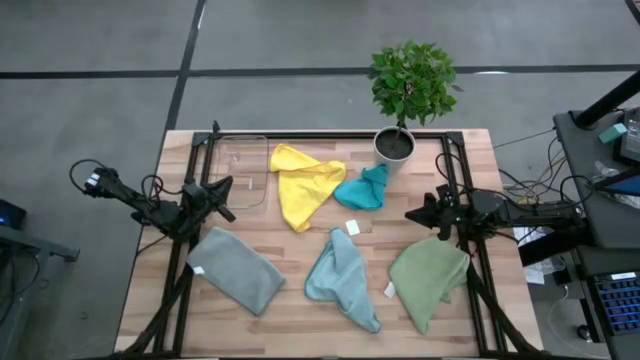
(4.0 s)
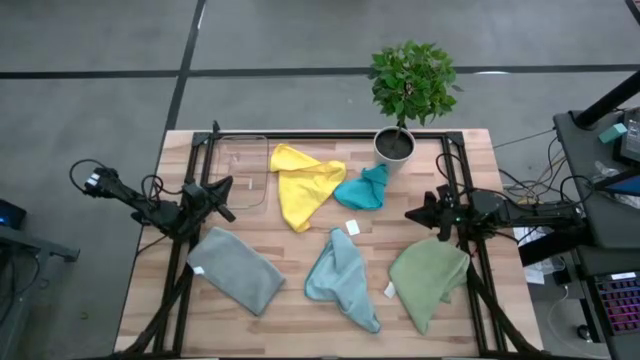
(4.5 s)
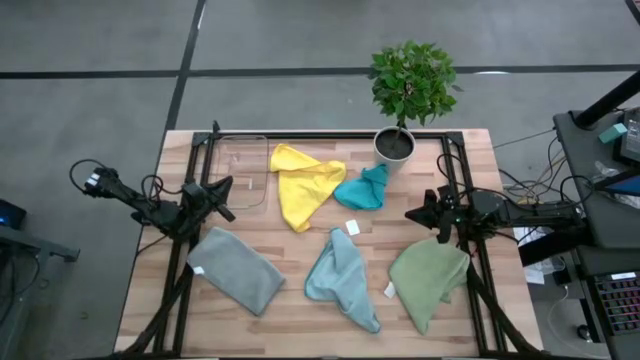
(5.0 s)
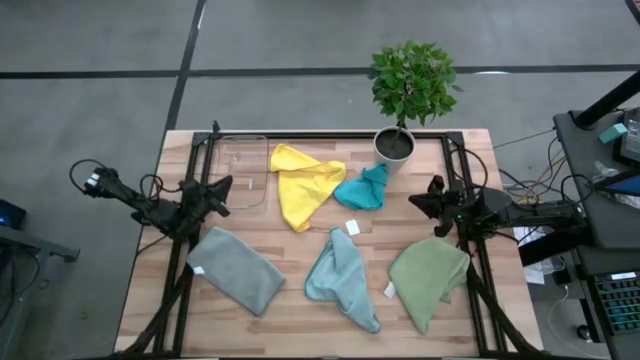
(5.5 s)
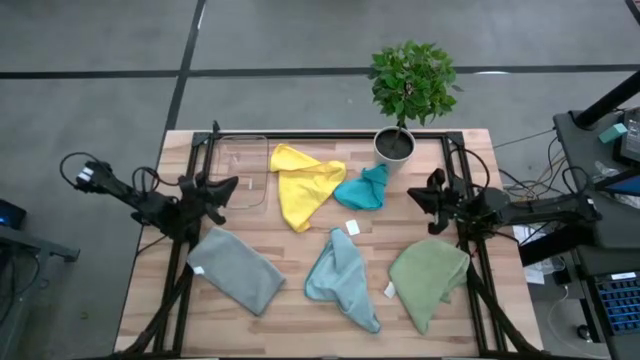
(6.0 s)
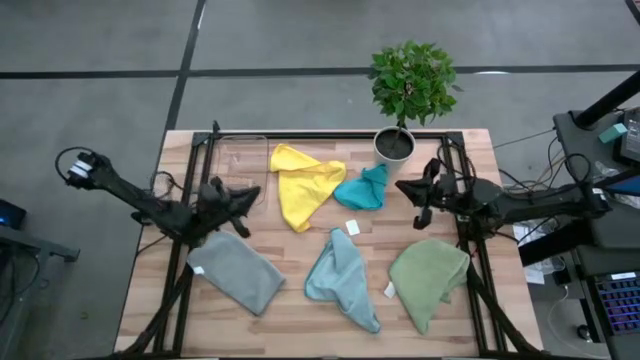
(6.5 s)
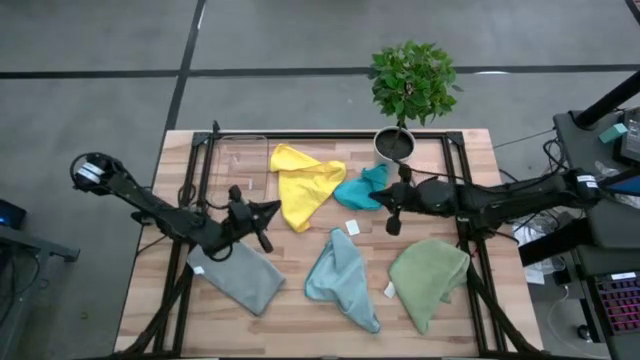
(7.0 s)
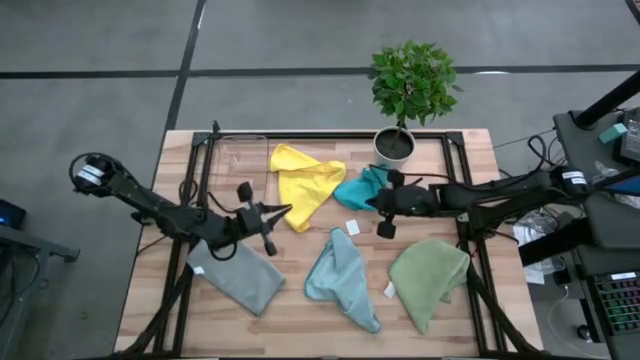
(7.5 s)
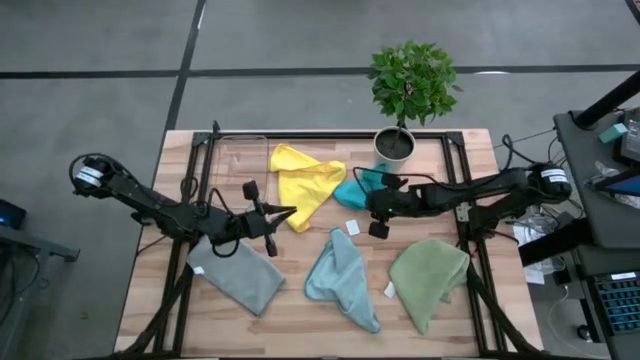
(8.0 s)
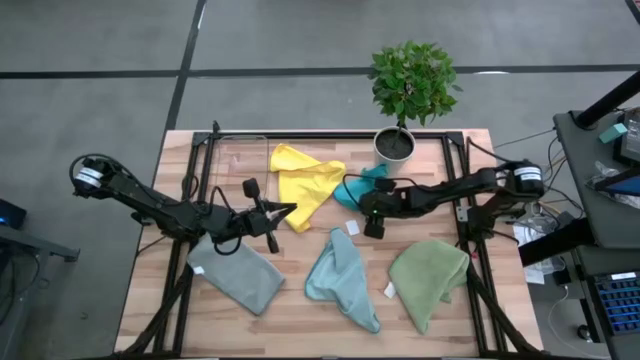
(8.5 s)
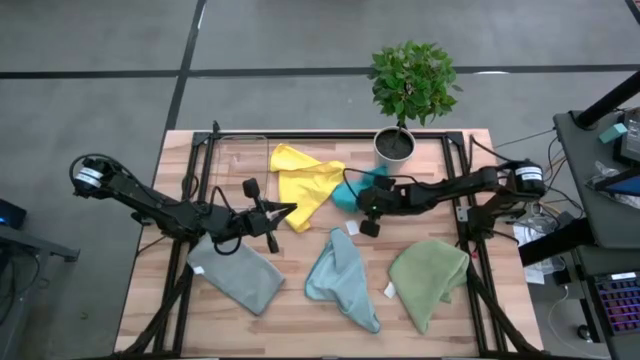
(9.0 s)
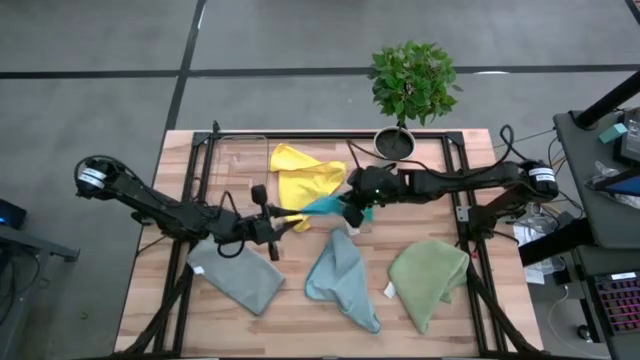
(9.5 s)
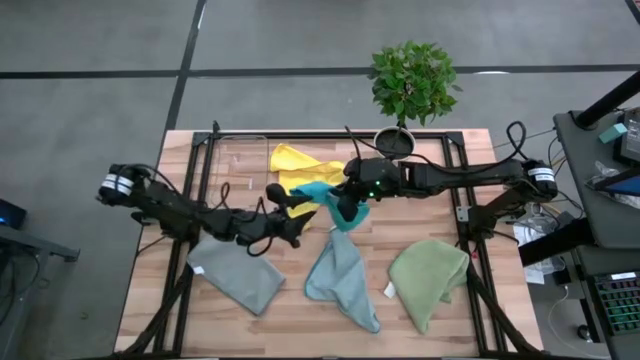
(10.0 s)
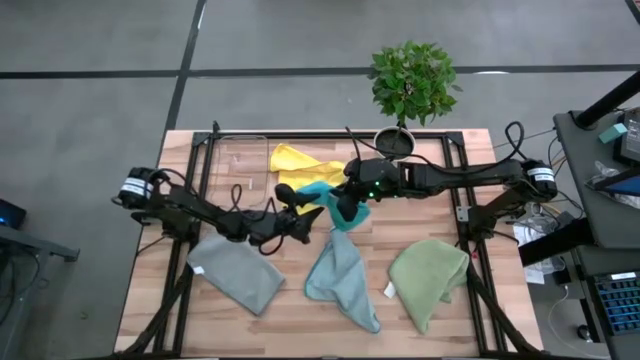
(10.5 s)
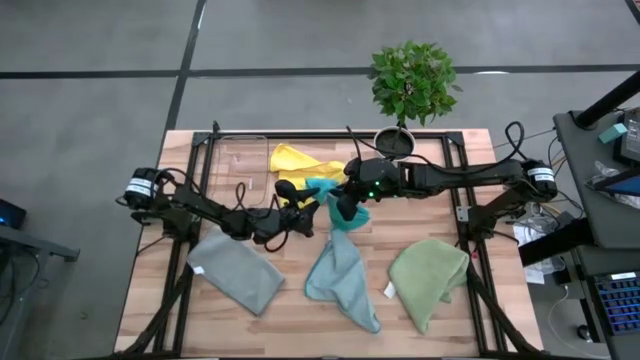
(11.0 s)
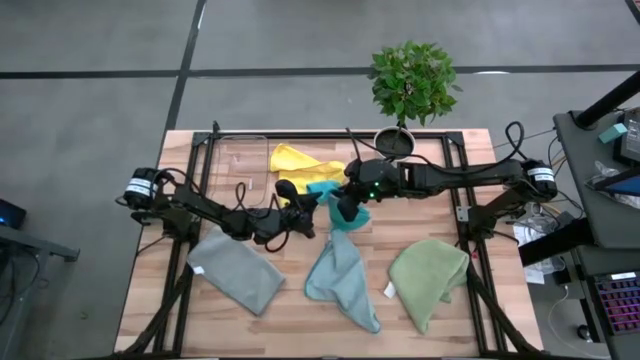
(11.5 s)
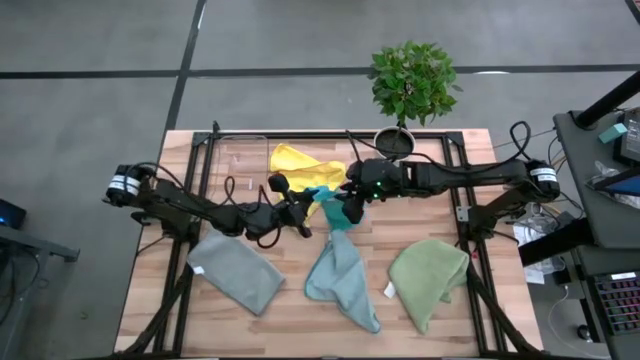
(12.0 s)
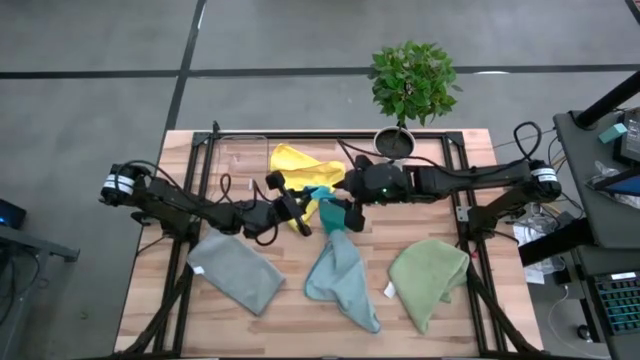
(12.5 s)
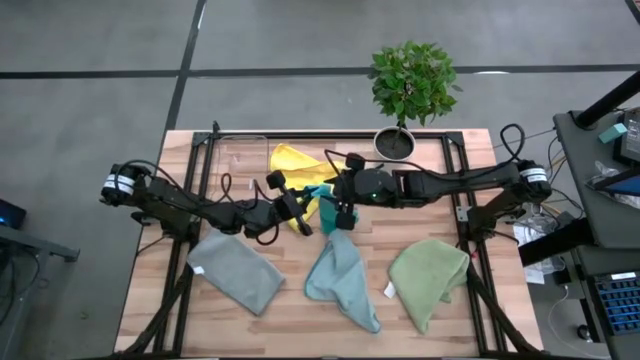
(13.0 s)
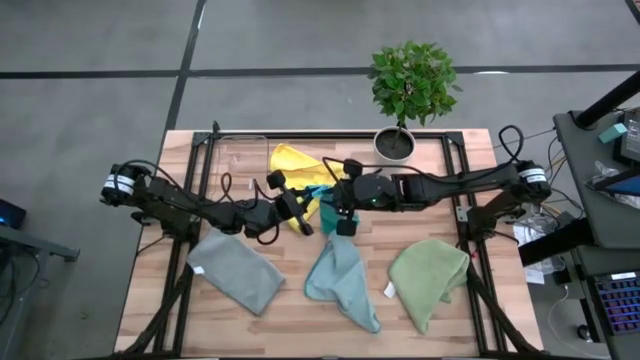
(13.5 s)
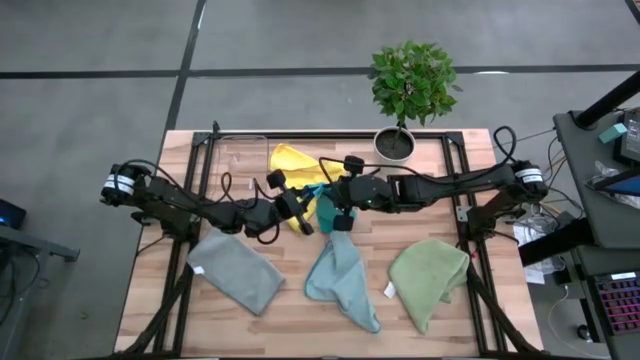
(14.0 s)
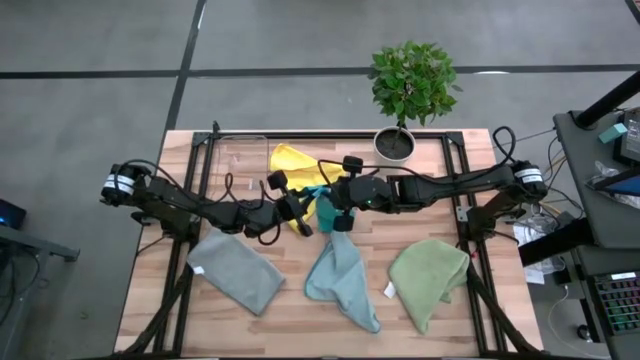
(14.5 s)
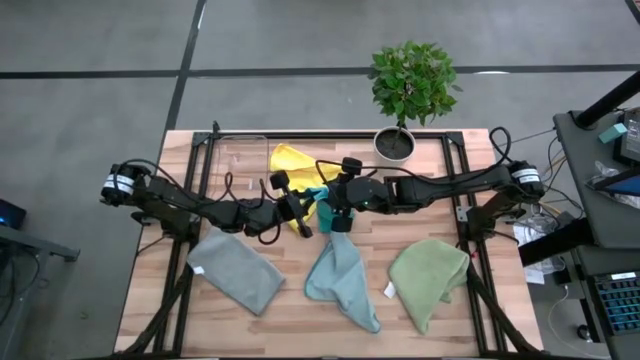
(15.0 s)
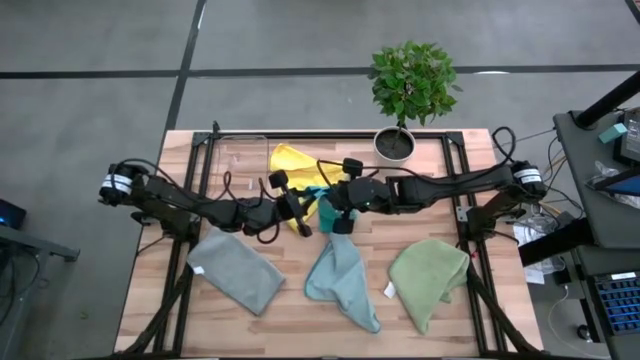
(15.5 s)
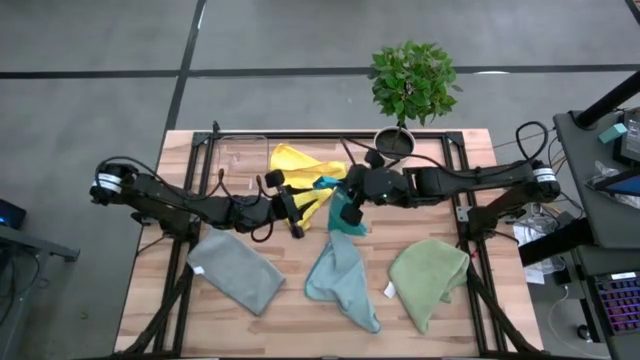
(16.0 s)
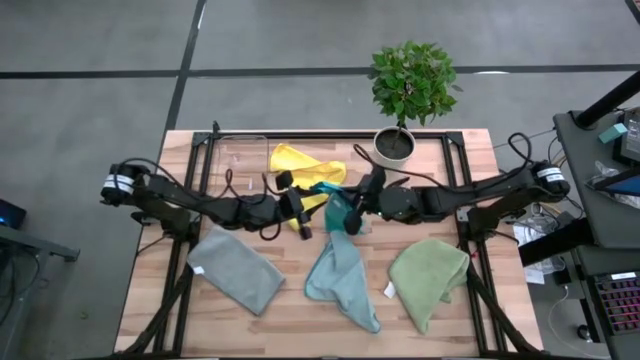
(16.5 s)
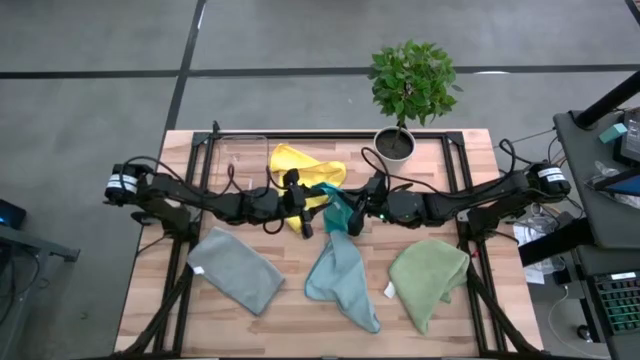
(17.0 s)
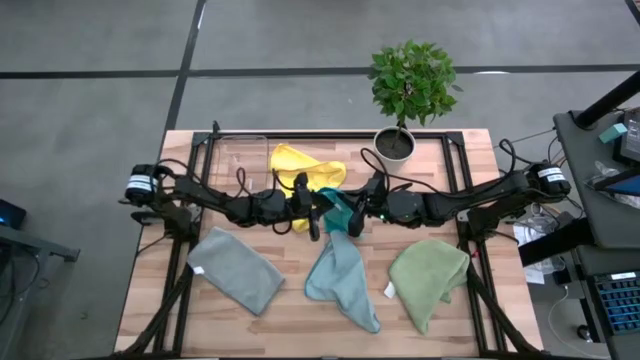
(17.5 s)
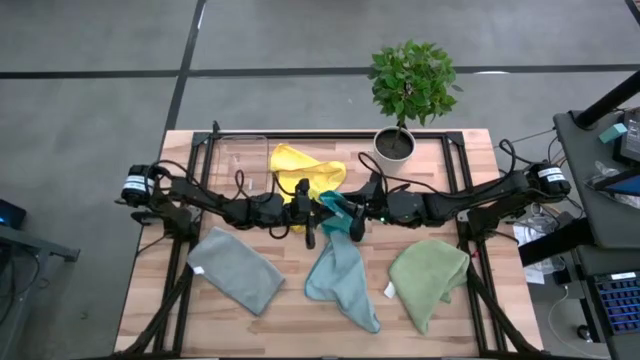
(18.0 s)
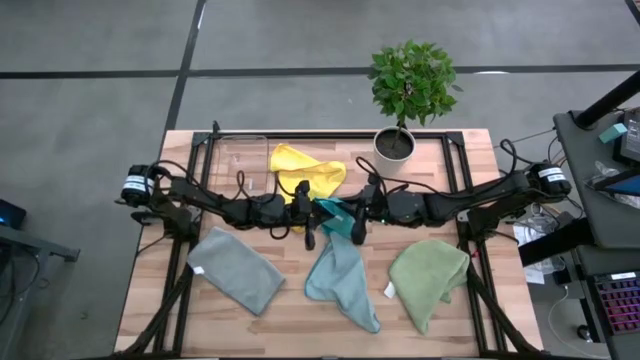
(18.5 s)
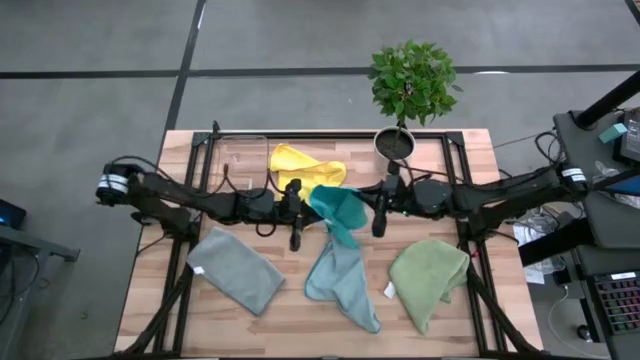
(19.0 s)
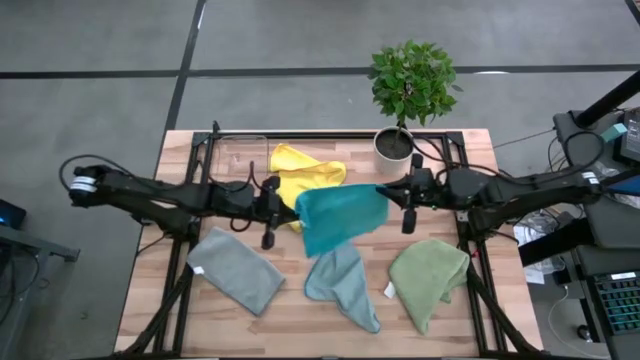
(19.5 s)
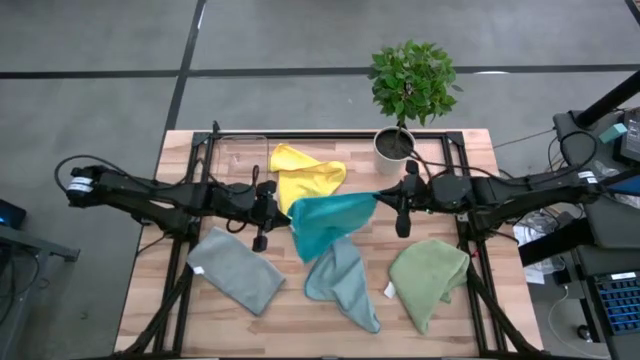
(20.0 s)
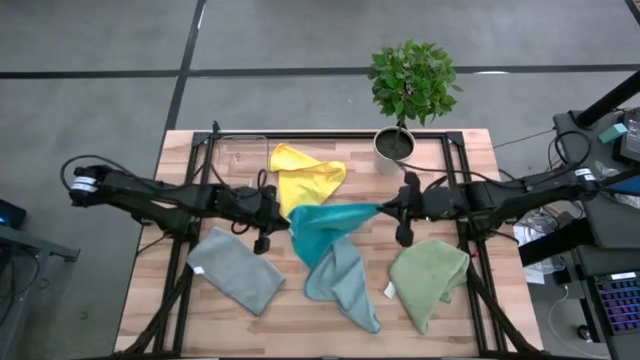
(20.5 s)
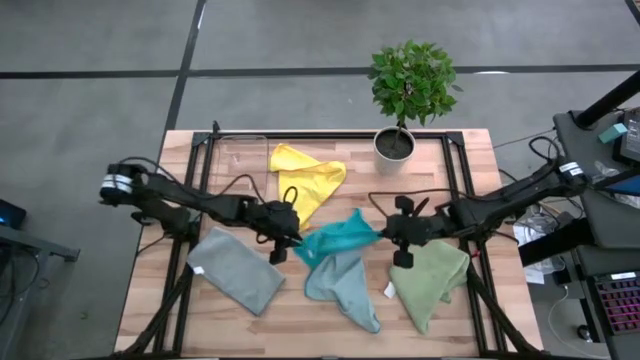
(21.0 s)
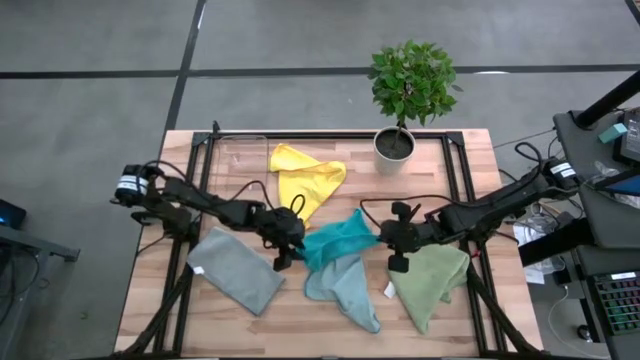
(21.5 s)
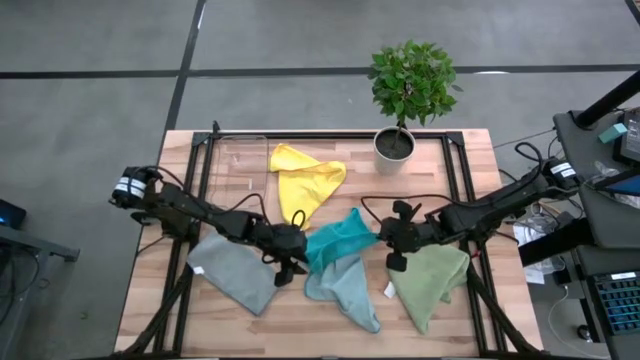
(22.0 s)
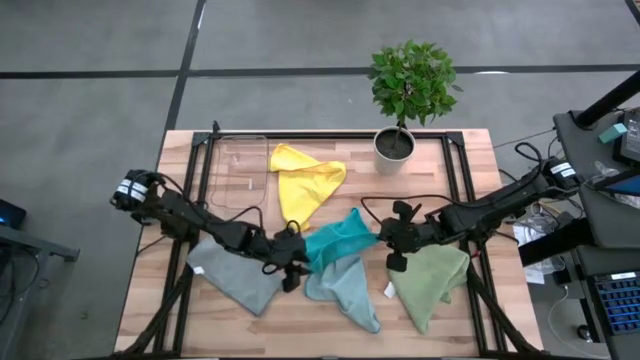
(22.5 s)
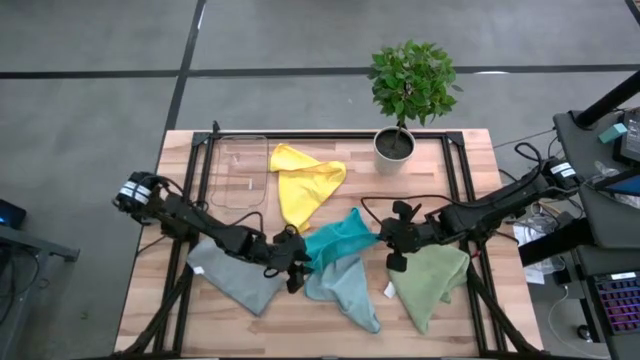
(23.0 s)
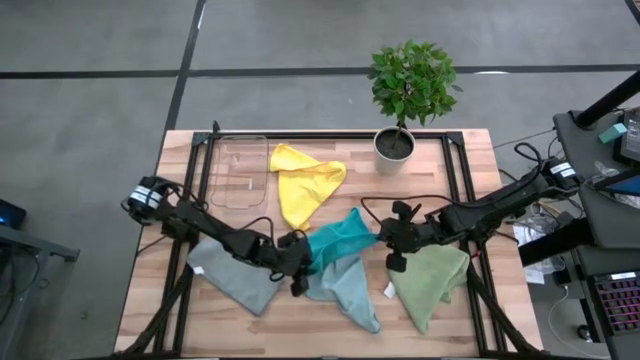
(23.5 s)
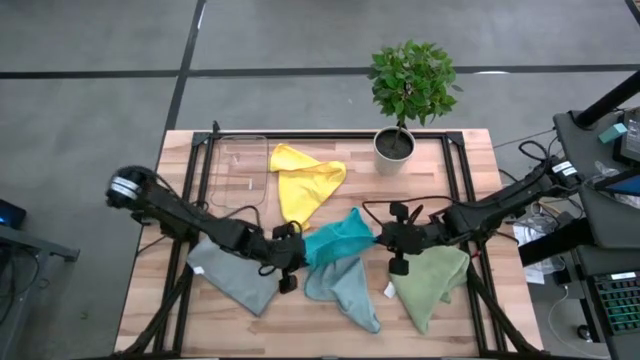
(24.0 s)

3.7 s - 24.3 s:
Task: Fold microfiber towels
Fold the blue microfiber towel
